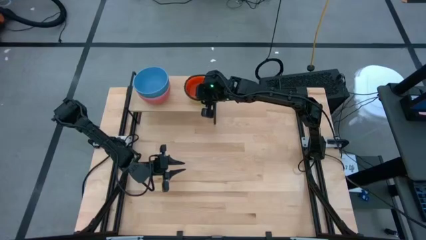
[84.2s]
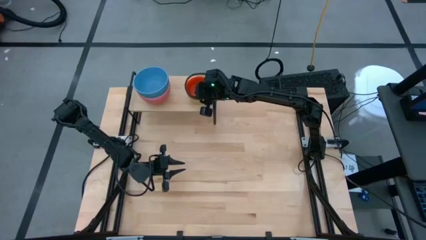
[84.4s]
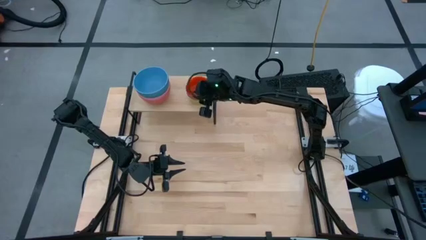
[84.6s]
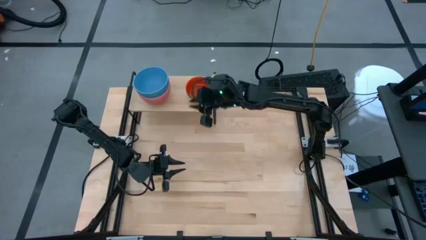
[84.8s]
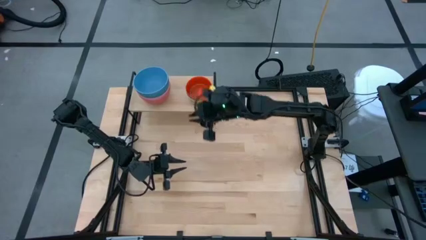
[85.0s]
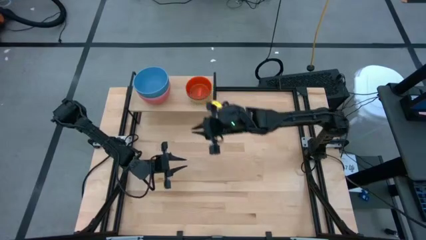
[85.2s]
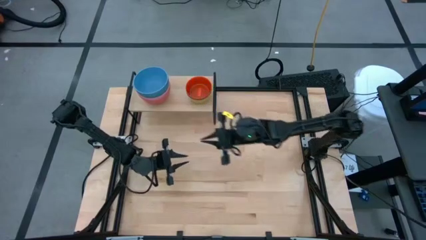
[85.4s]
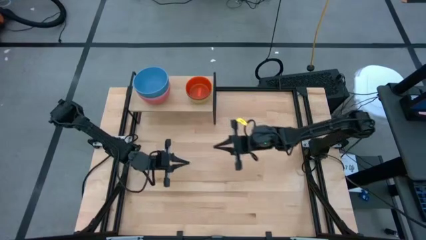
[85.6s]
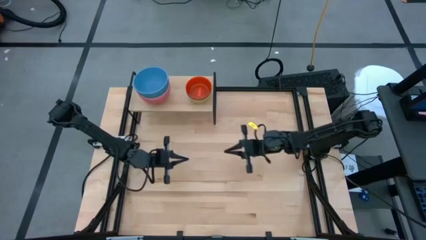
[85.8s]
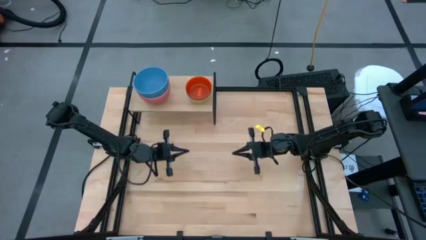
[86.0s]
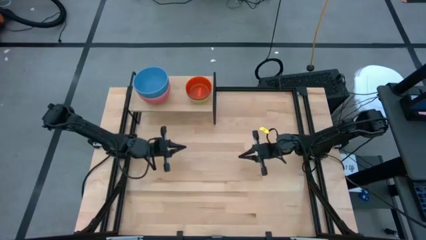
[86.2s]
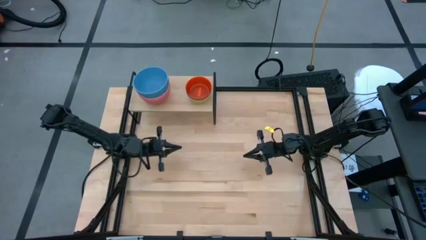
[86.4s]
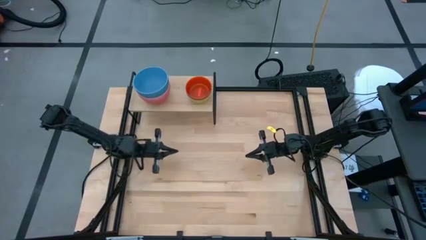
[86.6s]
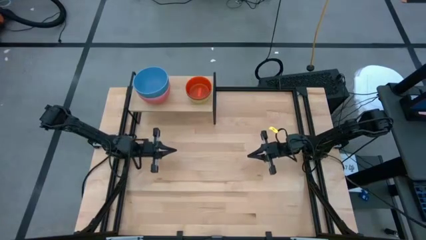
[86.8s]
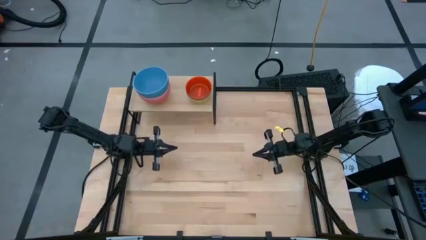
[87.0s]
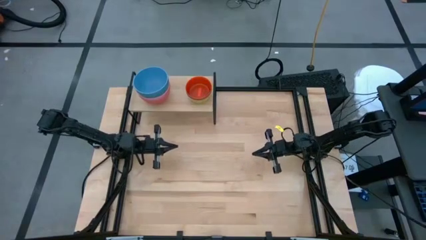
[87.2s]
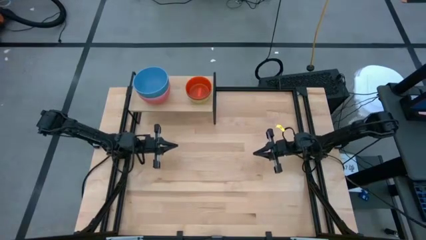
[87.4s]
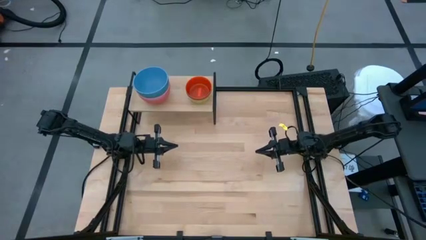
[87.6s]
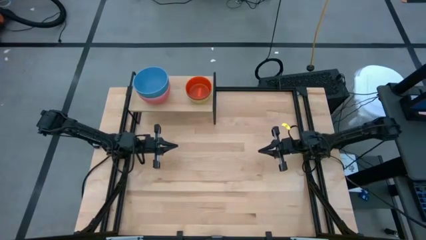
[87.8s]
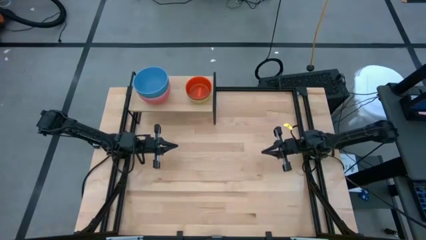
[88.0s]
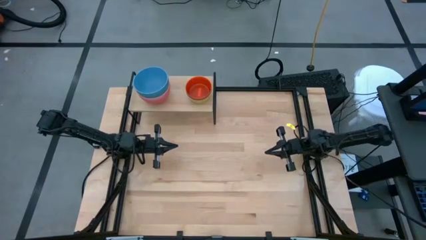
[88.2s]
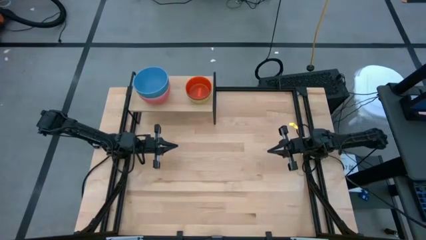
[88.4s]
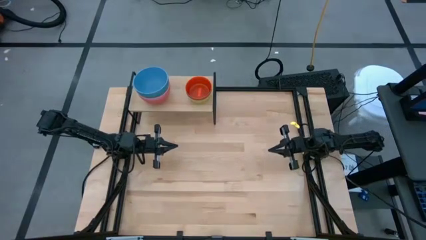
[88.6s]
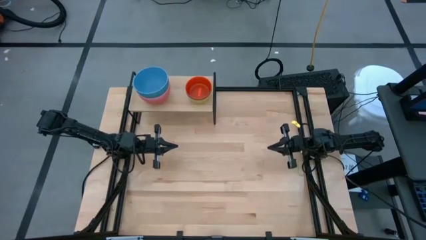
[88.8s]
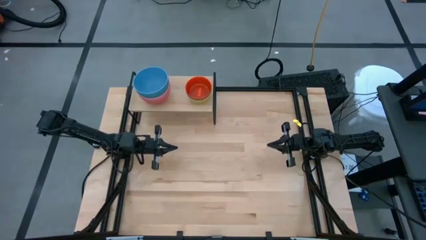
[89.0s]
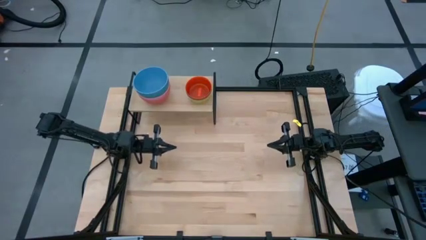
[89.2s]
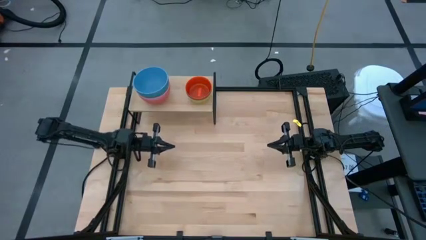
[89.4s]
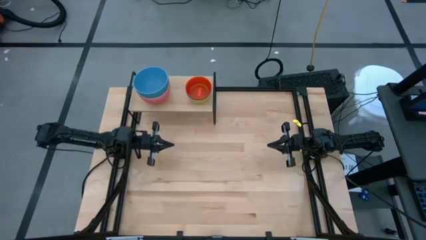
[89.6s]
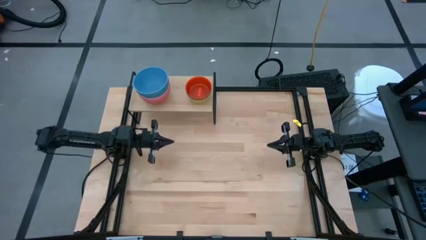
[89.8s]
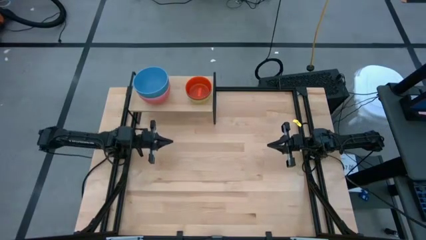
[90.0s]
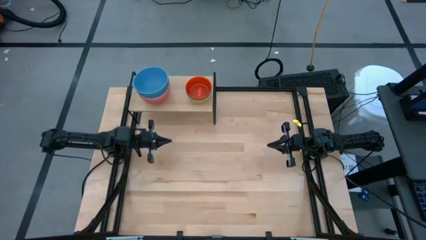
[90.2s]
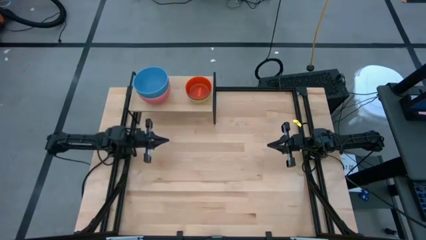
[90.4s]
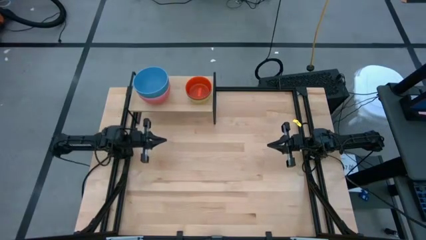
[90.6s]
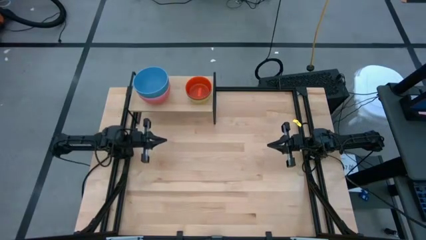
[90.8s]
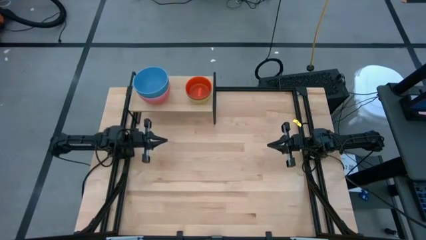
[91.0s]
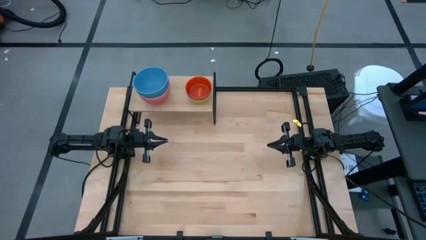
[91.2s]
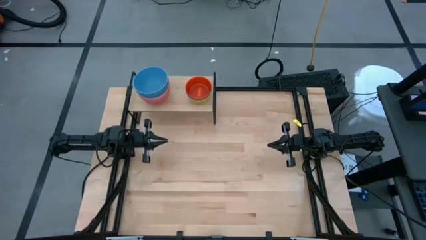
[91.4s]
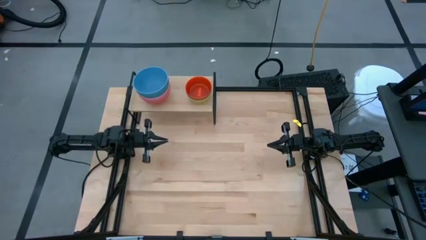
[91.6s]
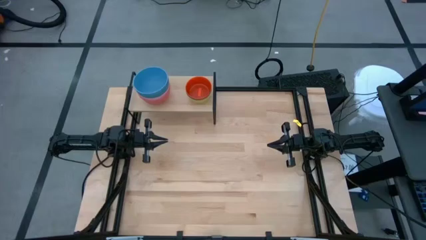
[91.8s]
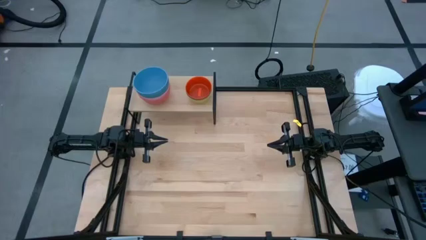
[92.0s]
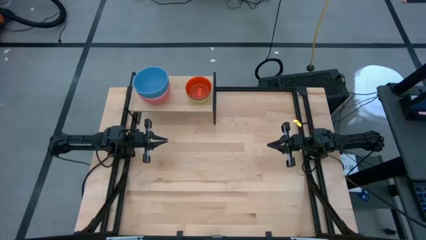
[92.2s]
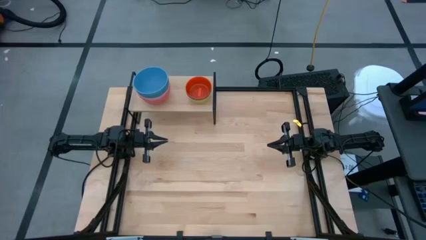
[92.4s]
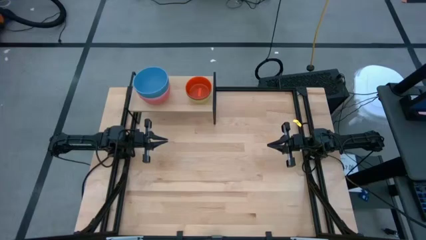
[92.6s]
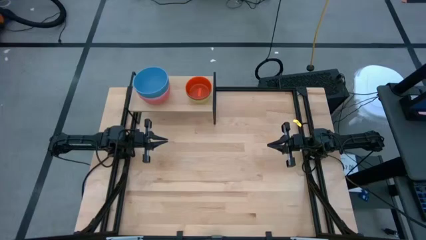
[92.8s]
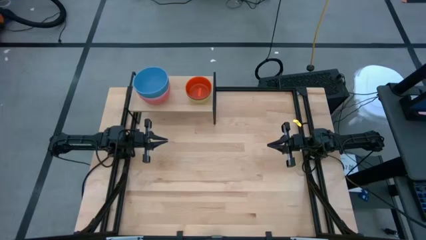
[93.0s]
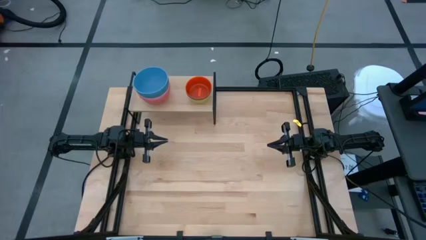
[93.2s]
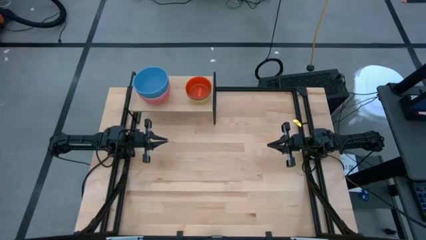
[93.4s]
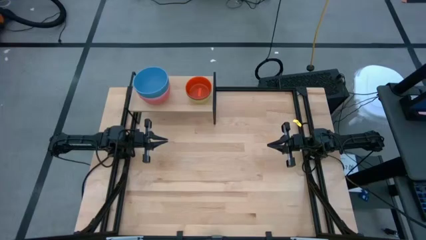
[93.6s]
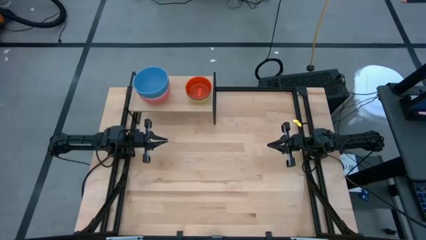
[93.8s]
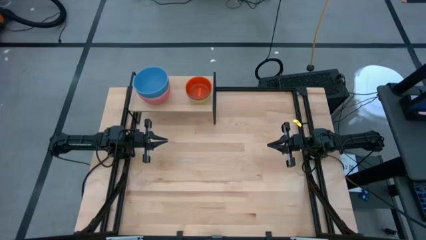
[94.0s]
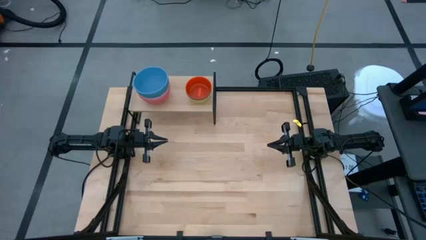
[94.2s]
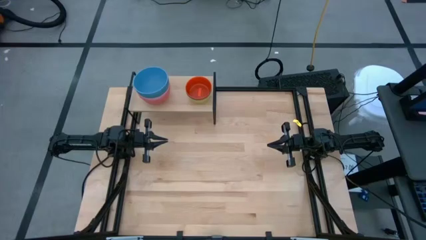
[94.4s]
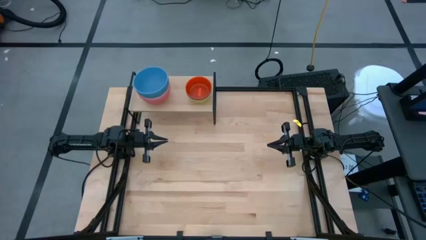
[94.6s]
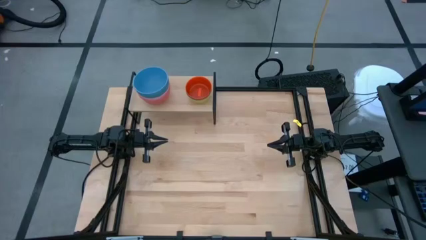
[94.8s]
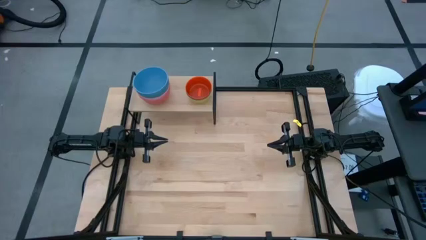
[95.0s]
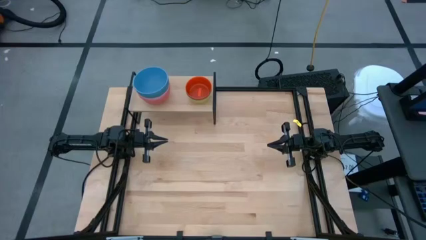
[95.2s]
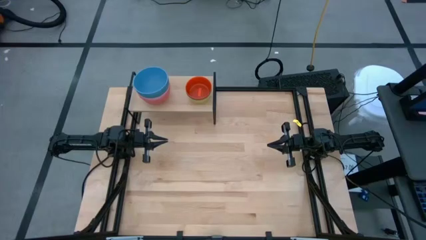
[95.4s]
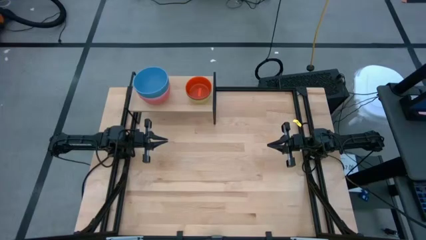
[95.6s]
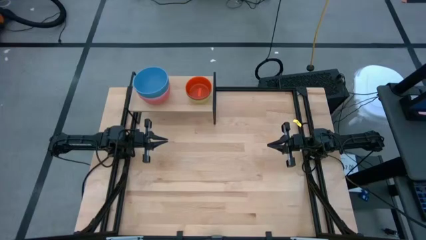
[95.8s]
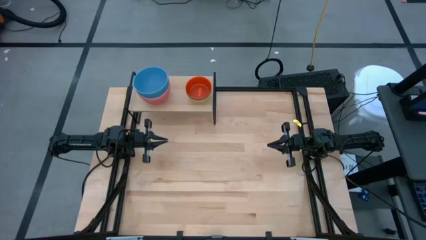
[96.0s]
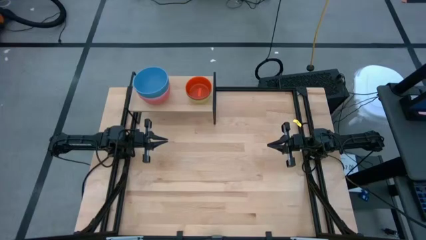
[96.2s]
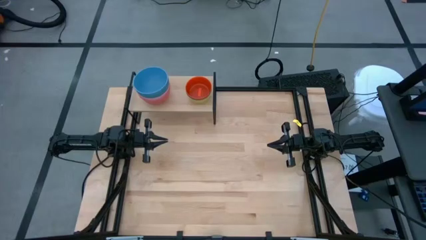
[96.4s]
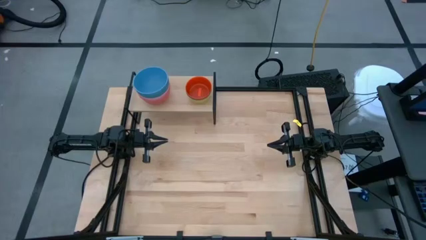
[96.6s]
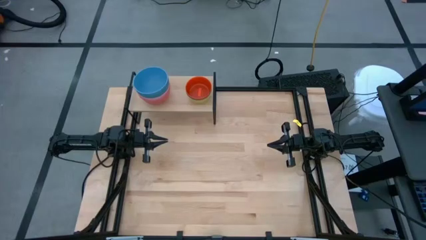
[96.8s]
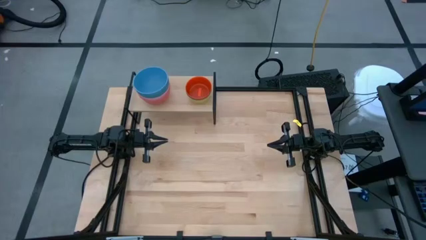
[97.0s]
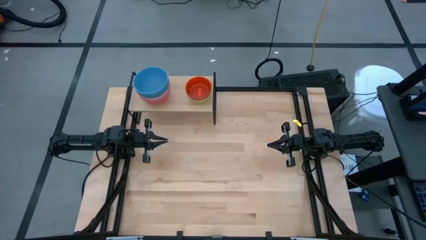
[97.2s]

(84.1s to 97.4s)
Task: Place and stack bowls onto a shelf
Return to Home Position
